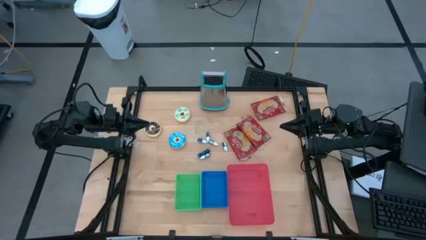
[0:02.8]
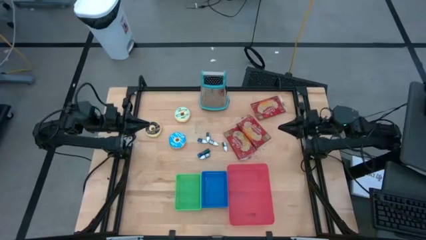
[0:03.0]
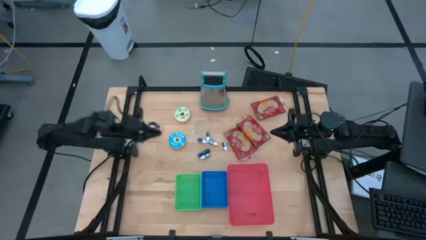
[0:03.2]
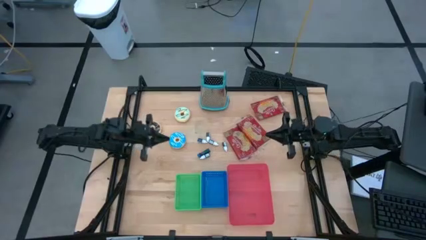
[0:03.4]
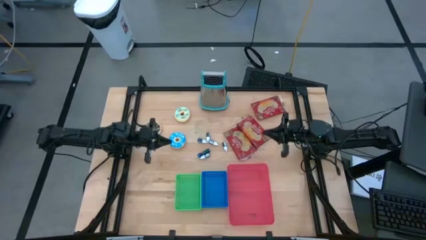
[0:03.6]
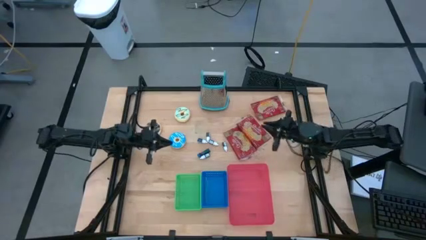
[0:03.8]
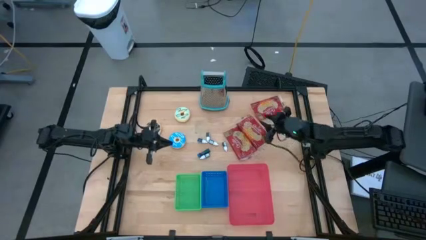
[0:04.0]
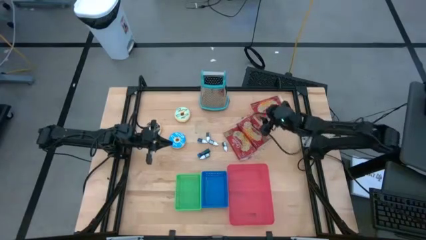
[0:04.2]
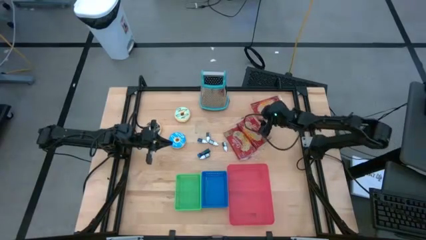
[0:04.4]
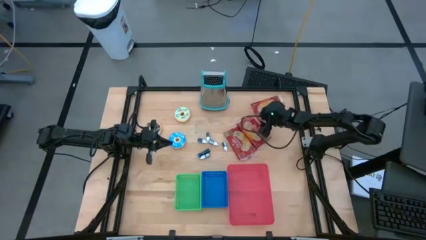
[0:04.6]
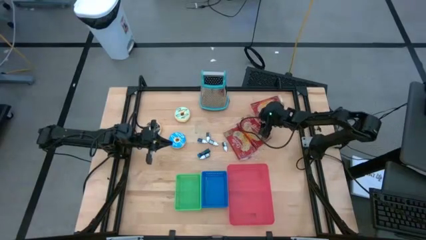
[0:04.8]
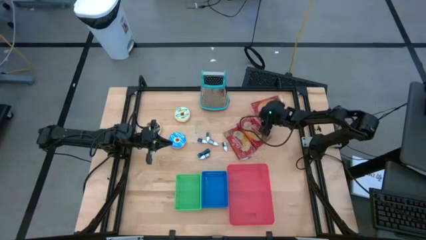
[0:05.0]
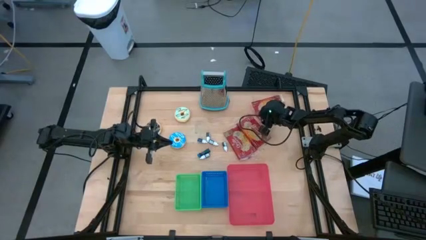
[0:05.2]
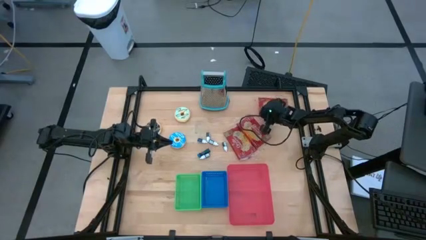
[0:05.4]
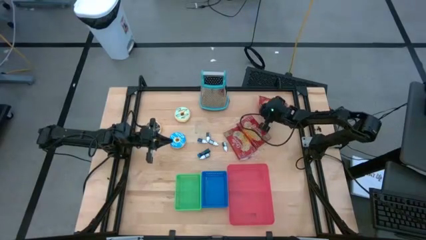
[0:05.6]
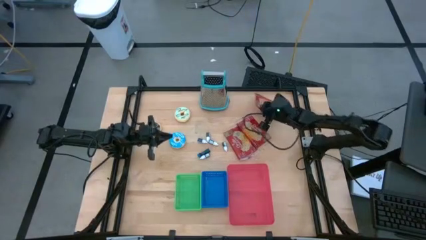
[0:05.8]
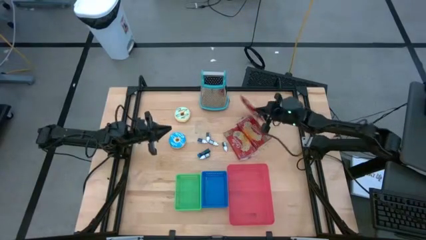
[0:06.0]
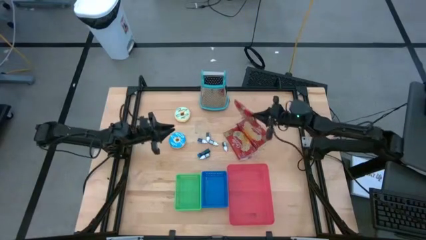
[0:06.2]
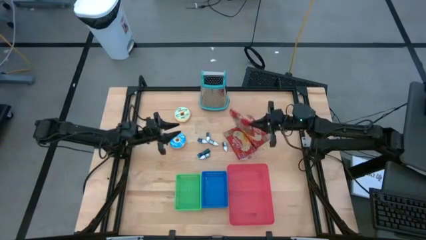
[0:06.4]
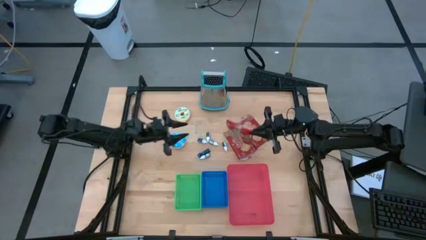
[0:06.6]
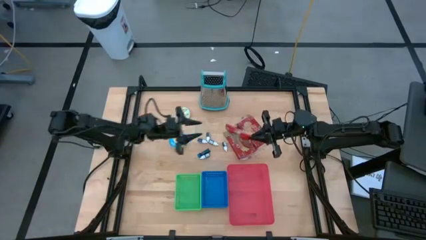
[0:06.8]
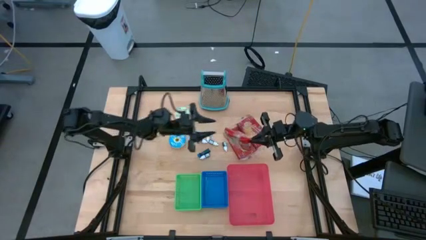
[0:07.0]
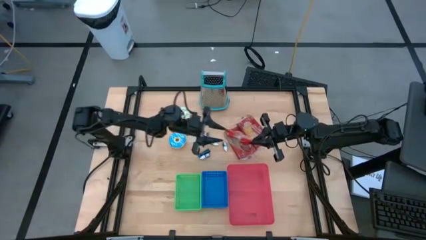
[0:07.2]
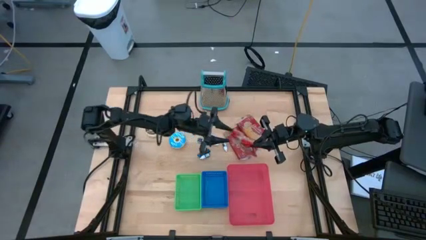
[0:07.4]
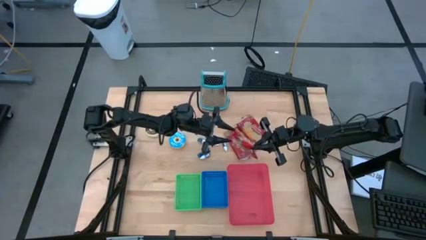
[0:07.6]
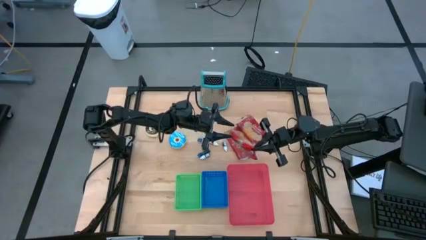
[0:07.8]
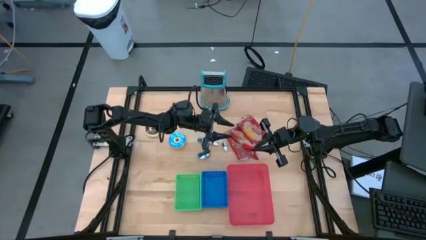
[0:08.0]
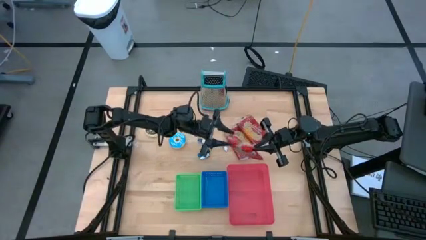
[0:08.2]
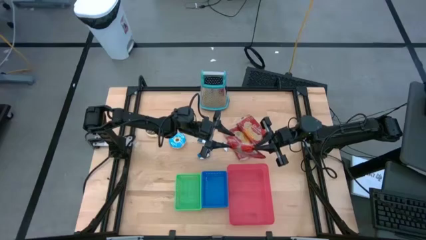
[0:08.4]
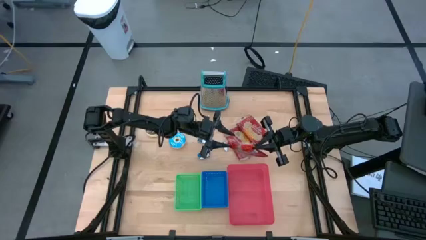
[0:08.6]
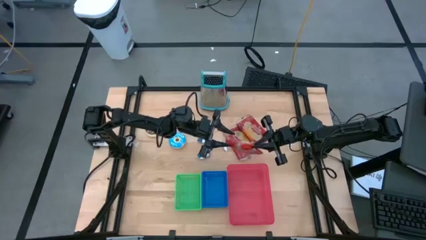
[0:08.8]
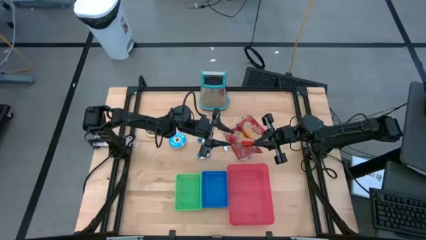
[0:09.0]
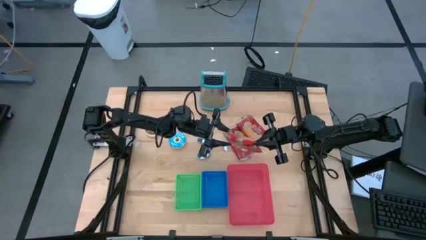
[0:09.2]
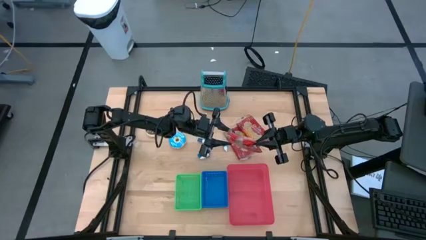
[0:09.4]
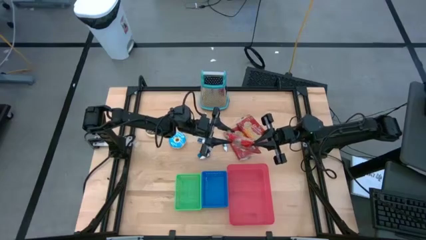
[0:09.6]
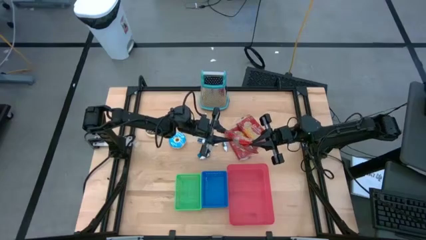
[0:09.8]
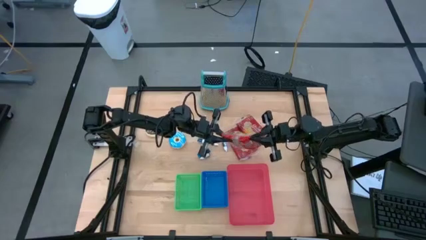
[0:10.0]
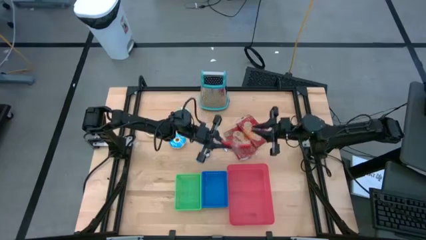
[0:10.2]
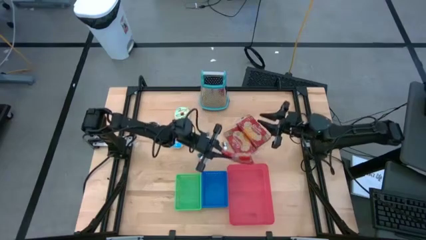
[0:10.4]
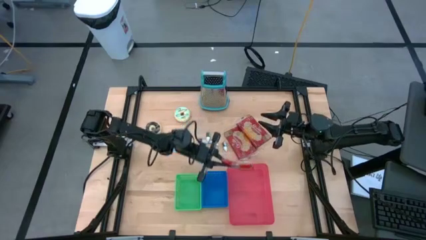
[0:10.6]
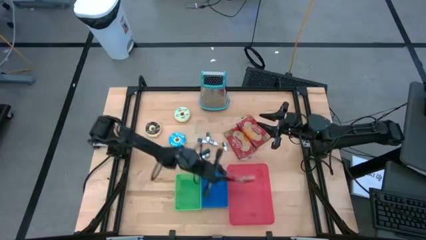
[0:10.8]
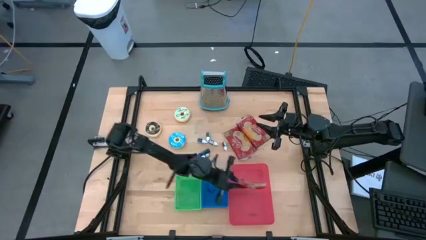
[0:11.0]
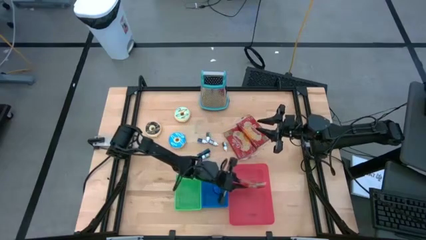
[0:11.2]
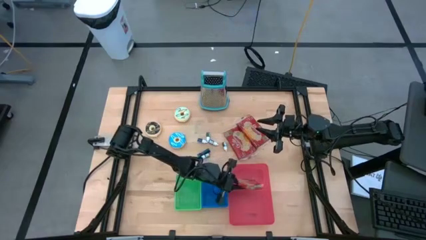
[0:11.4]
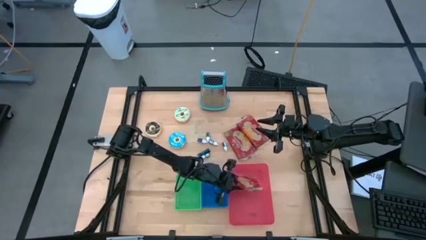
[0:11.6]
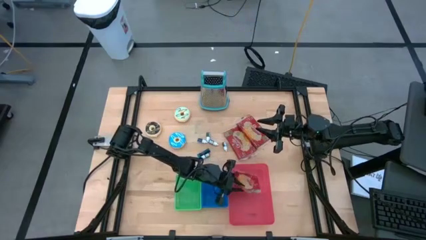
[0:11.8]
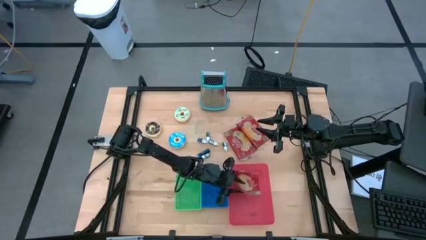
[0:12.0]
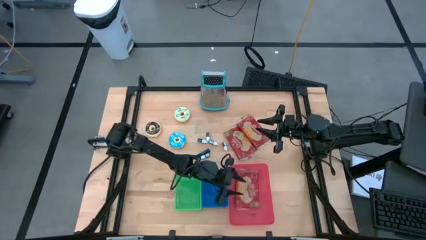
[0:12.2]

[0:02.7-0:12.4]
Put the top red popcorn bag into the red bin

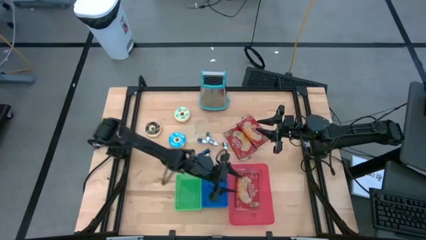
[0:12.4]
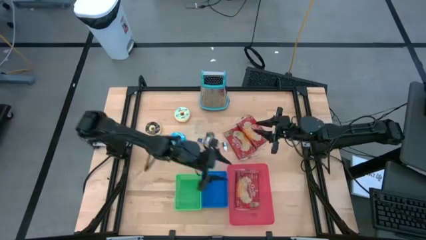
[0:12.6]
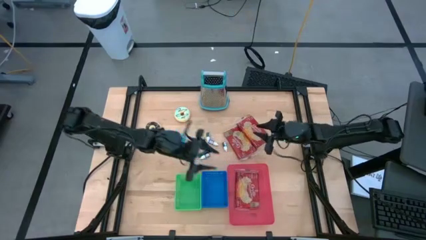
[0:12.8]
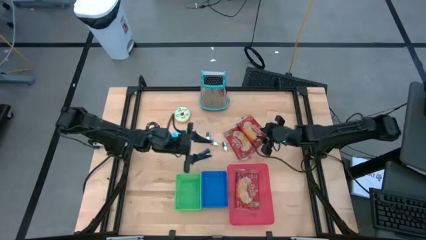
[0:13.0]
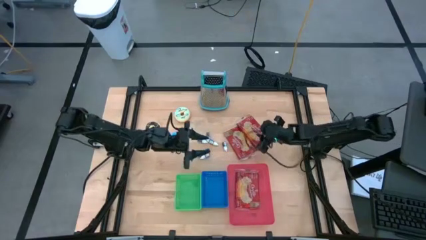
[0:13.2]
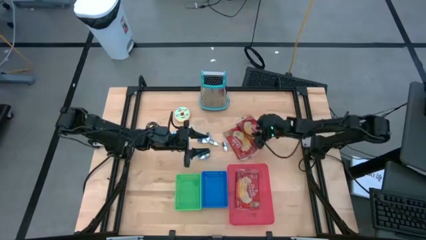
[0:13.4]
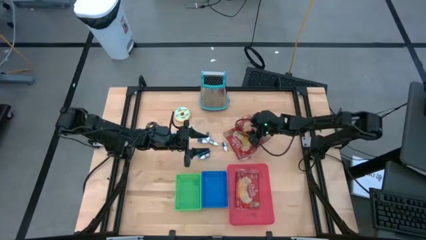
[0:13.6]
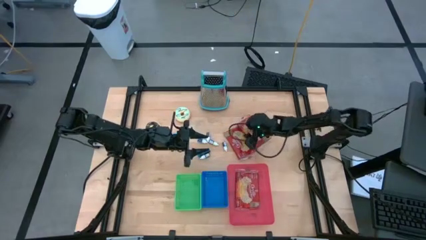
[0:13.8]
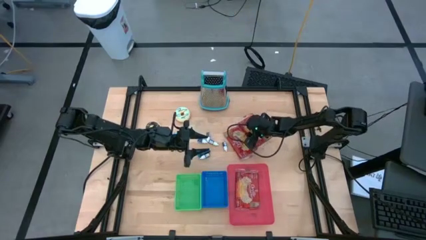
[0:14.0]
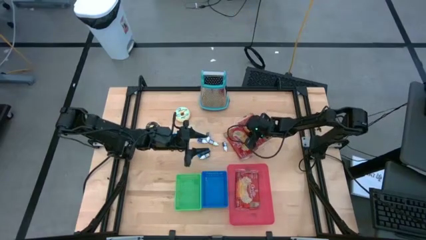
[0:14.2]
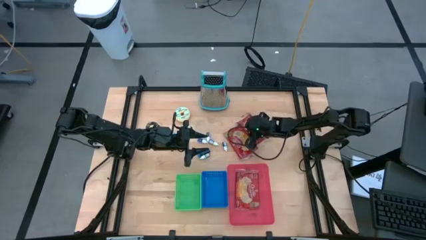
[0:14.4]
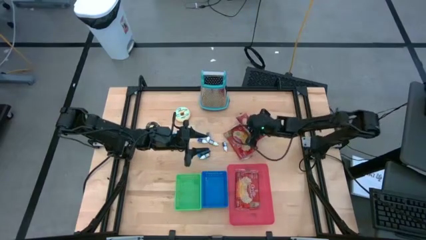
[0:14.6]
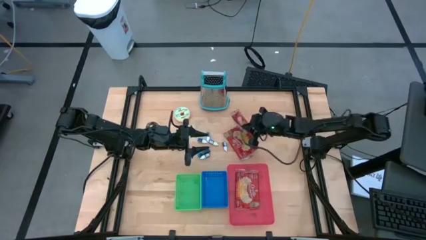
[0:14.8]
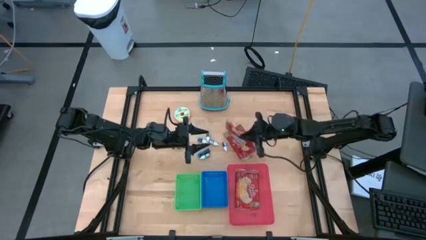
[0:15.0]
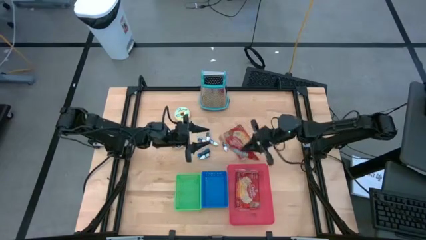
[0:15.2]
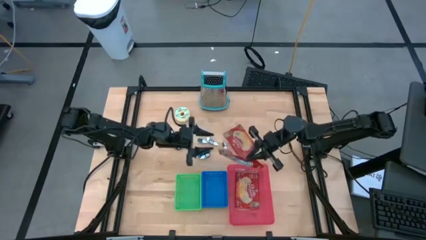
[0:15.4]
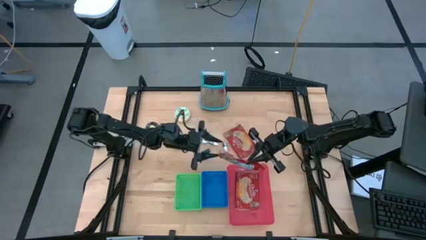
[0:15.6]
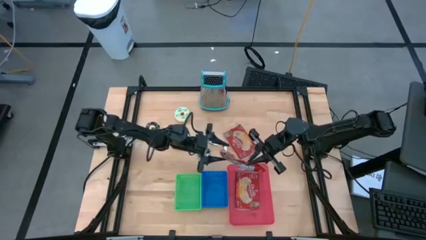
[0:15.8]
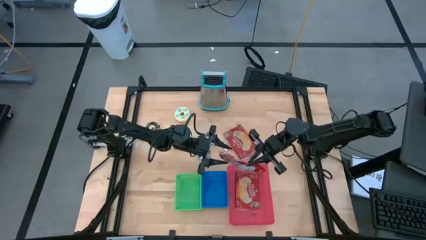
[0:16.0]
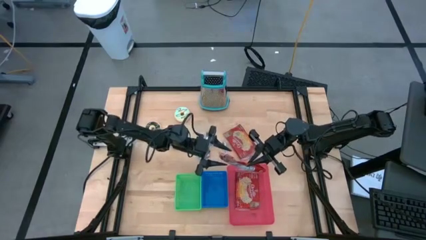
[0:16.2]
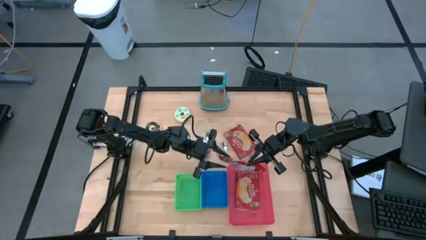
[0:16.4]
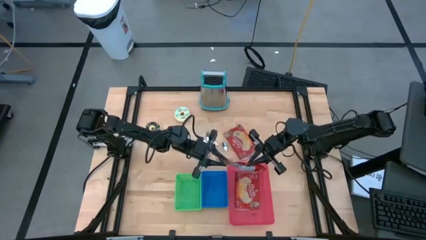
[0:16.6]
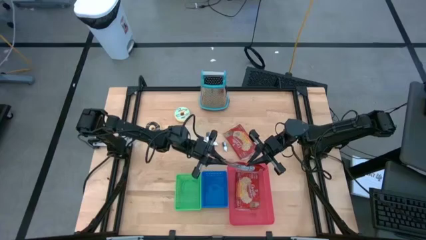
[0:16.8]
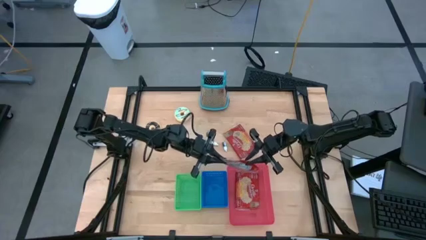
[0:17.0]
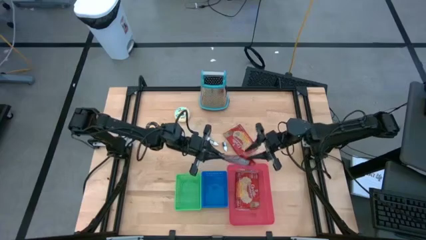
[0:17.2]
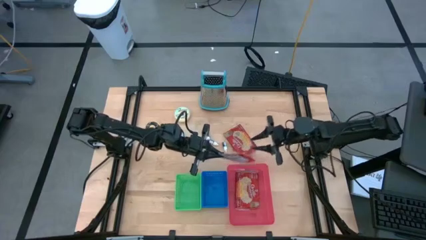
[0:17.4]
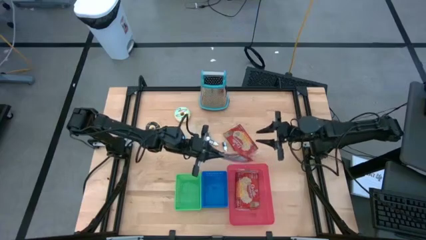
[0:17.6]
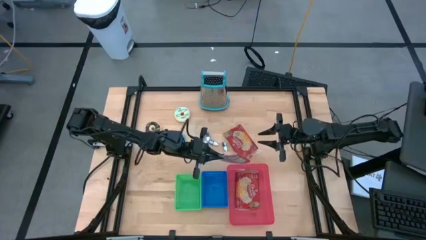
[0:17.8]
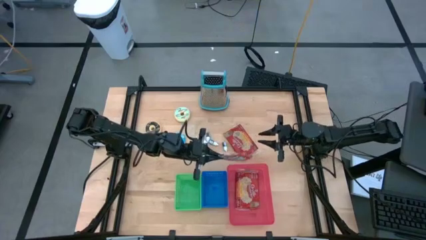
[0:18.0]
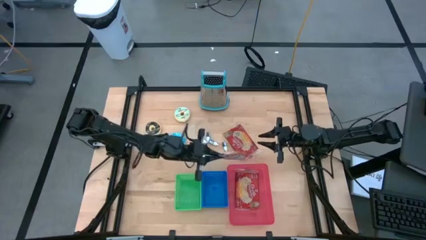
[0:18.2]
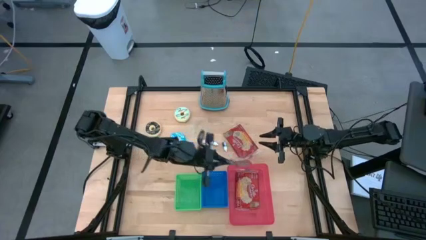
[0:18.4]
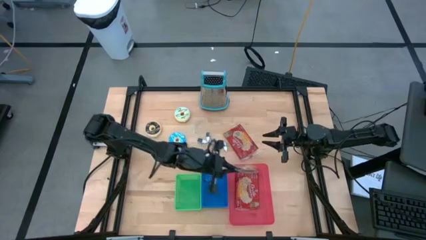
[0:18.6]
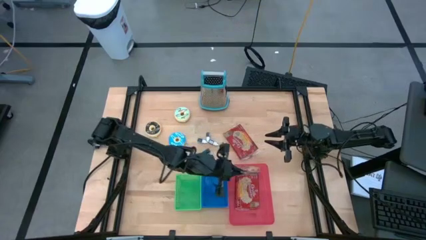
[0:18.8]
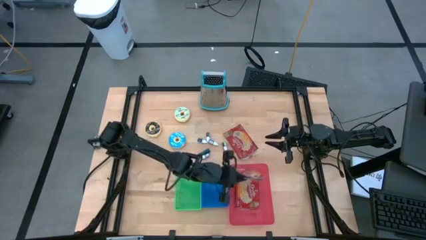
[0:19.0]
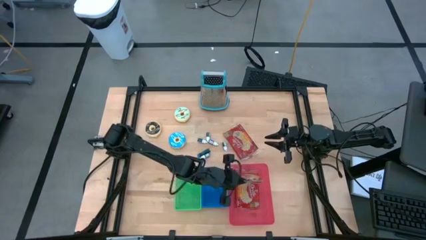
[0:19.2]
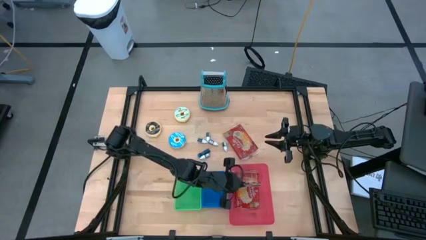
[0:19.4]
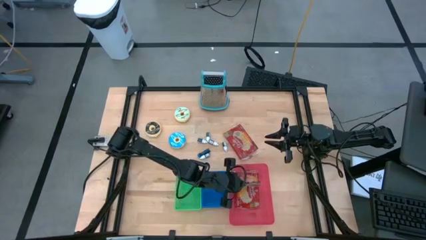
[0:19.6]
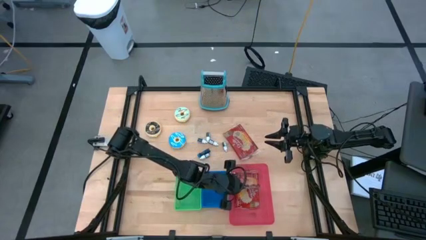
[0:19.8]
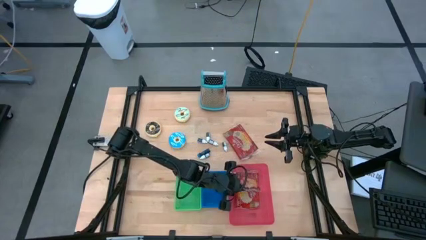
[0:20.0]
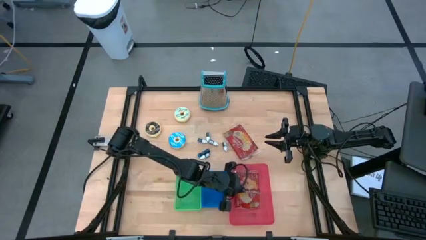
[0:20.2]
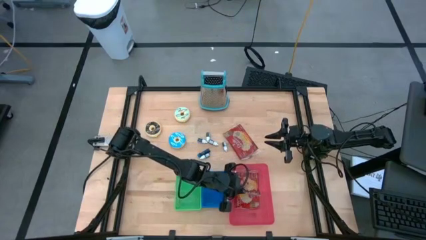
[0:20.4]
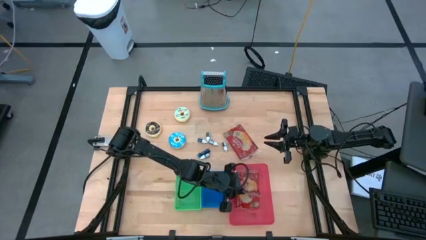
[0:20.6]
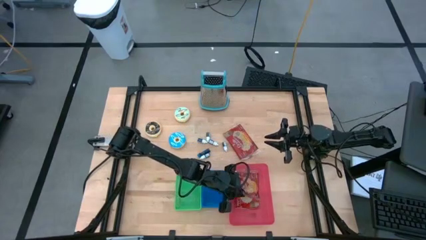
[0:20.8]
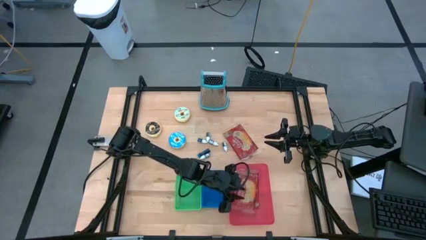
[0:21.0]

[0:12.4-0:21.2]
Stack the top red popcorn bag on the red popcorn bag
